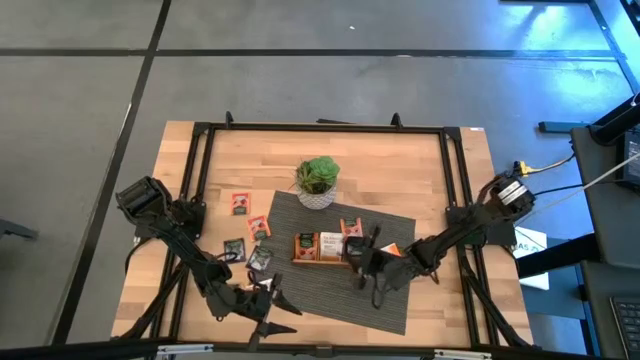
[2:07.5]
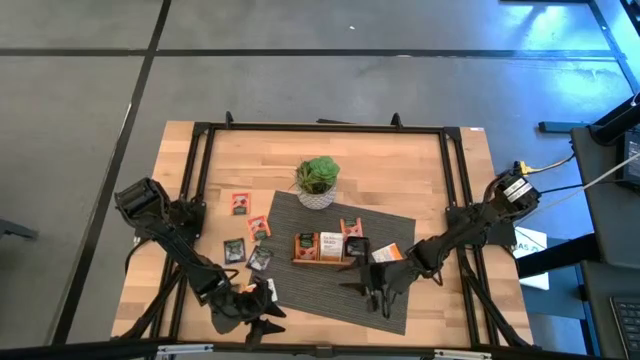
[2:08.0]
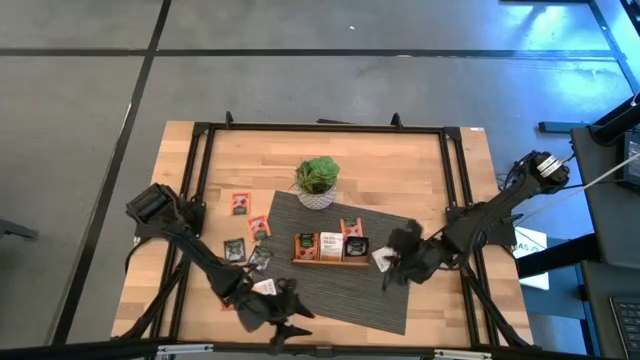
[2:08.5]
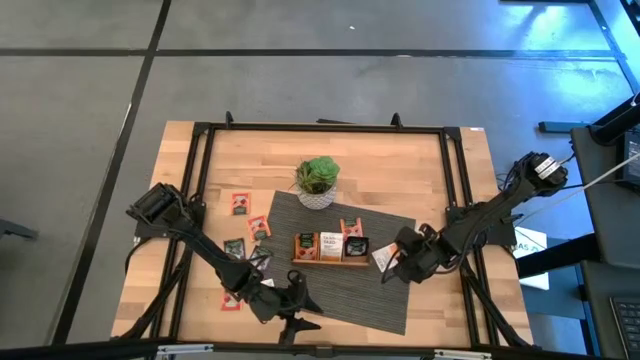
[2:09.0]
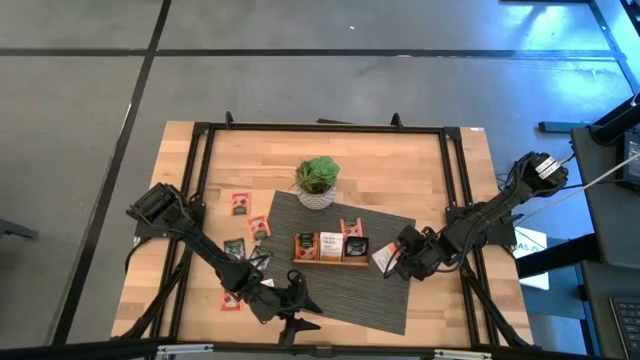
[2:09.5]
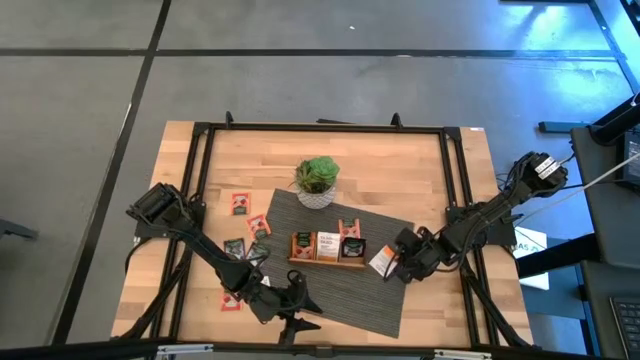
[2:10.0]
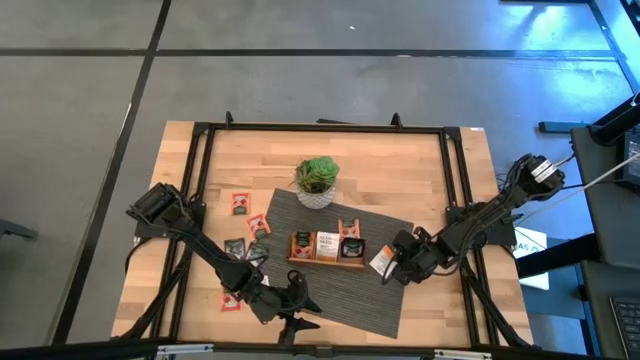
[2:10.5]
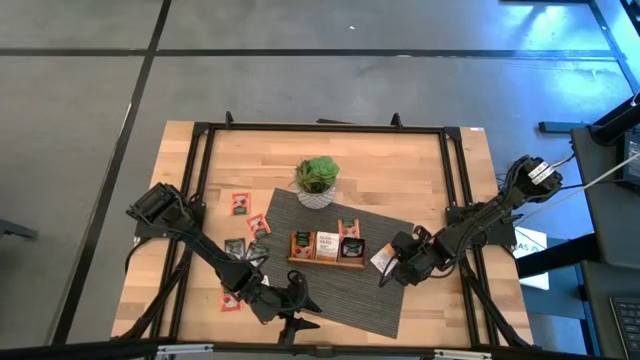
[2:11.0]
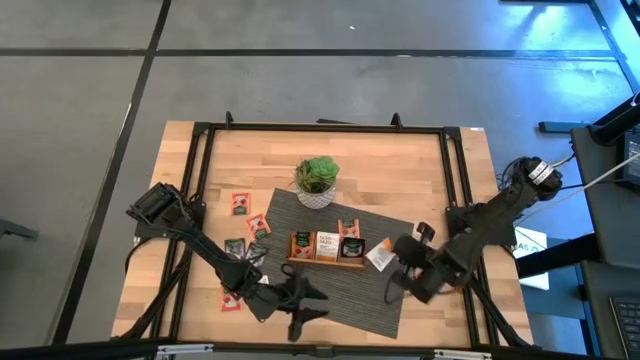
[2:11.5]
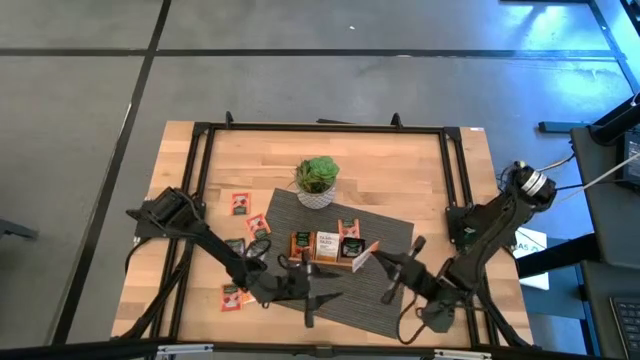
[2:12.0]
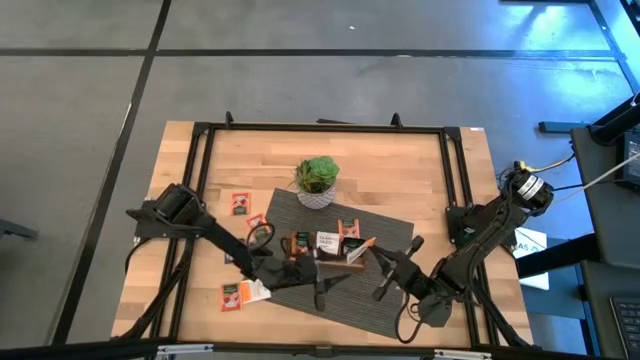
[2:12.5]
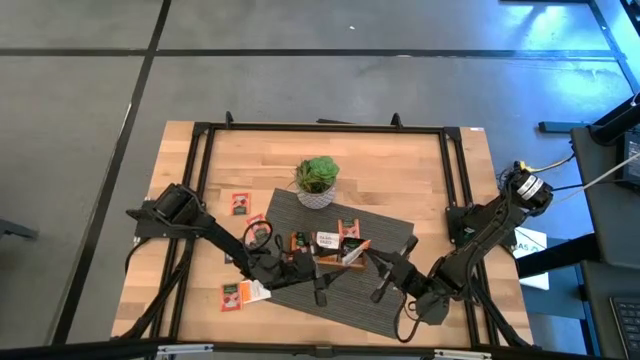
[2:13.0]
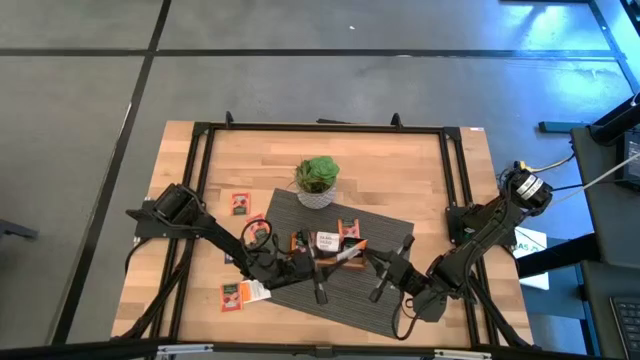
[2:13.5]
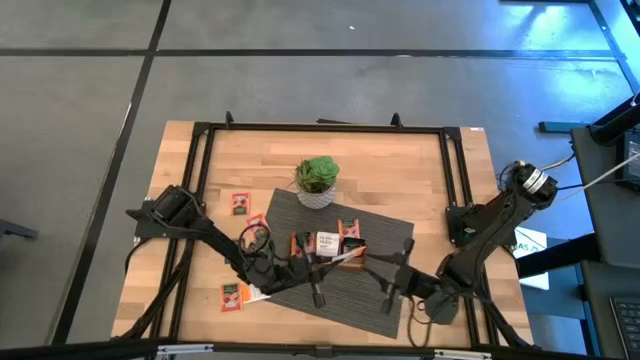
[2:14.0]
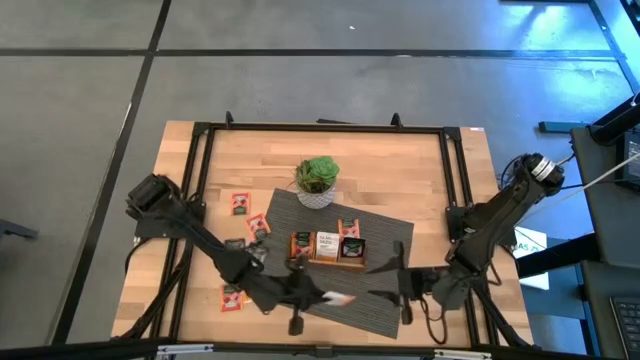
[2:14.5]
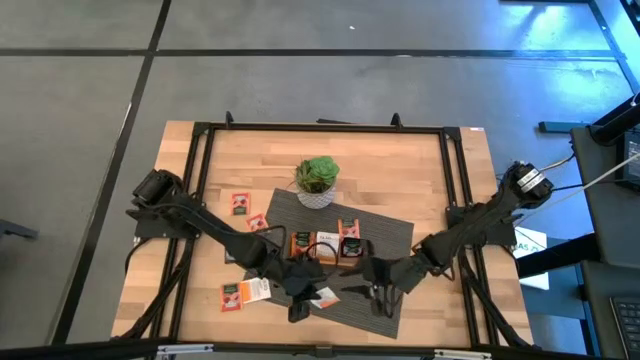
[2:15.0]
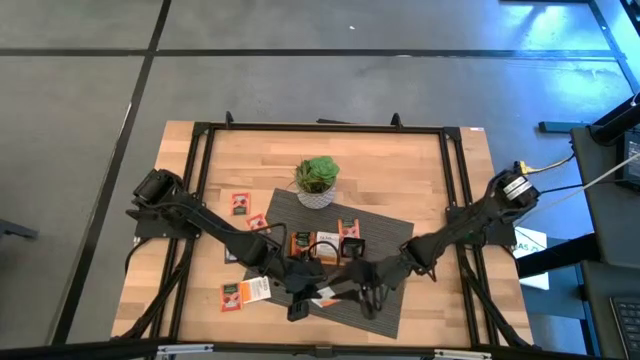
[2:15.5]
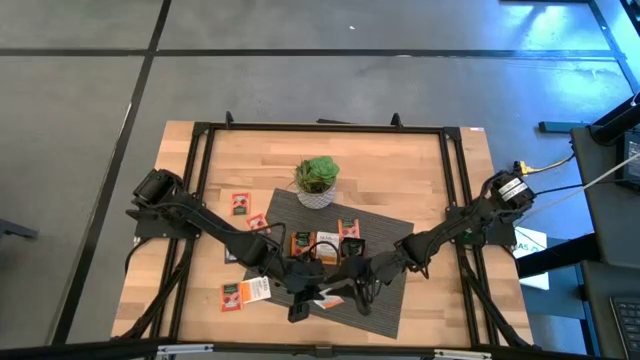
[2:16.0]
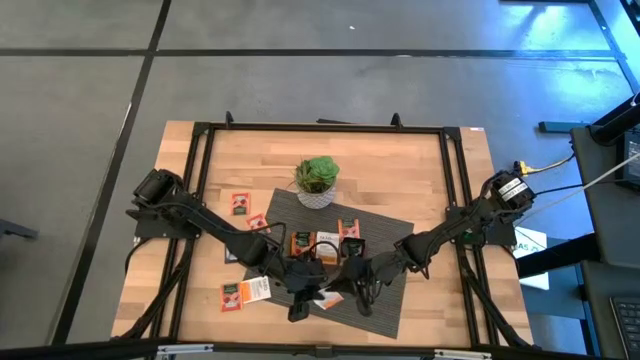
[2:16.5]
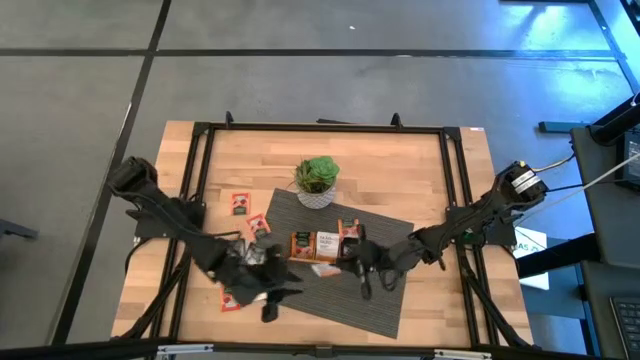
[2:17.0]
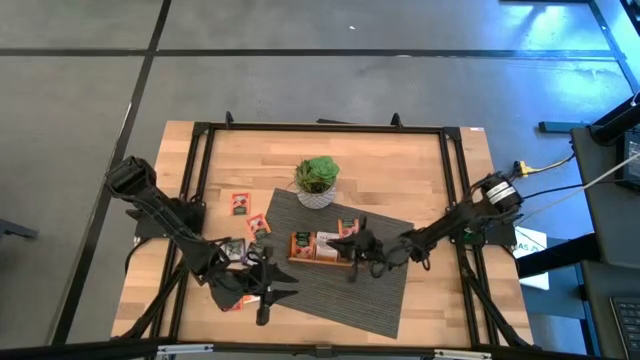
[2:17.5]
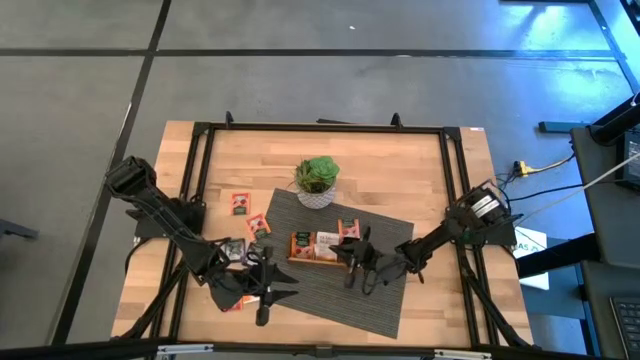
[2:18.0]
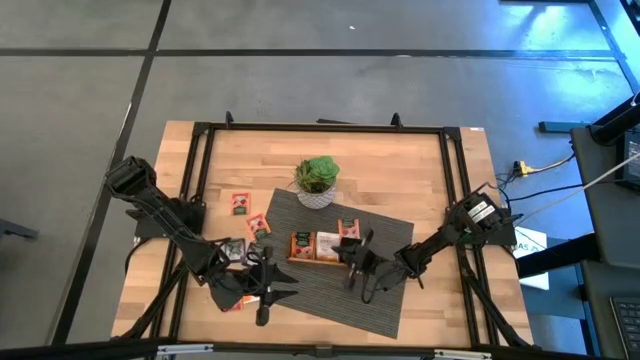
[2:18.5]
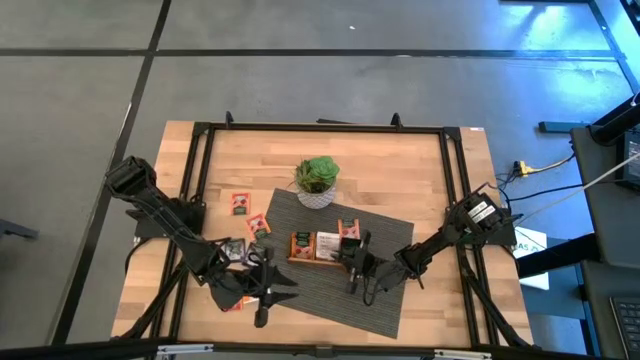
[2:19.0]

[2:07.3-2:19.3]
Task: Pick & Place Tea
Put the white tea bag into the middle of the wooden organizer
